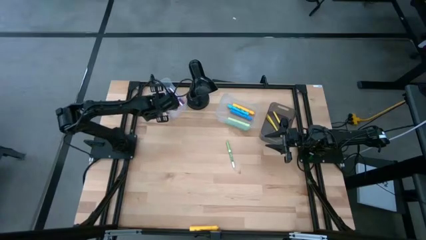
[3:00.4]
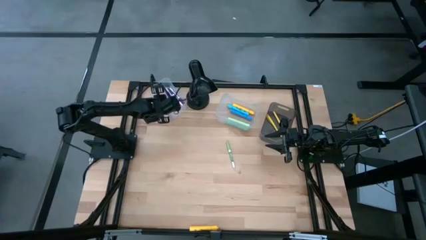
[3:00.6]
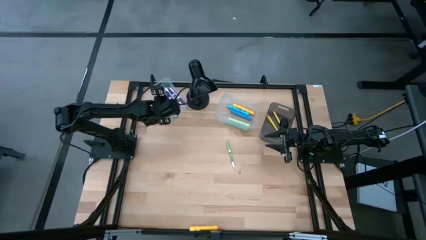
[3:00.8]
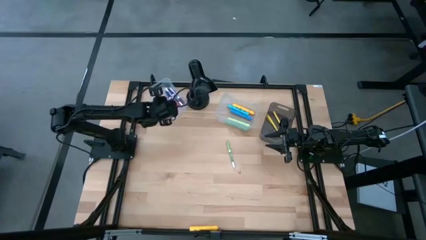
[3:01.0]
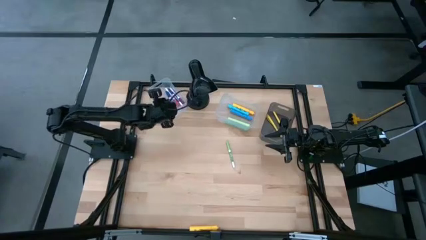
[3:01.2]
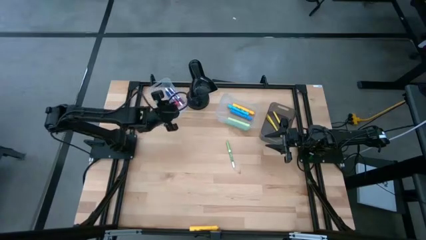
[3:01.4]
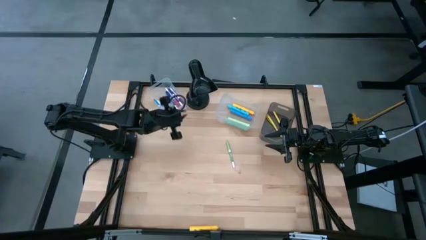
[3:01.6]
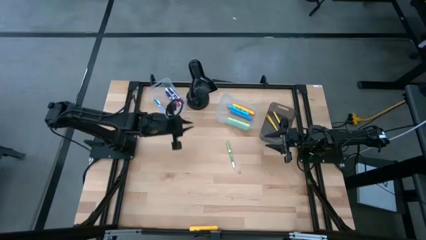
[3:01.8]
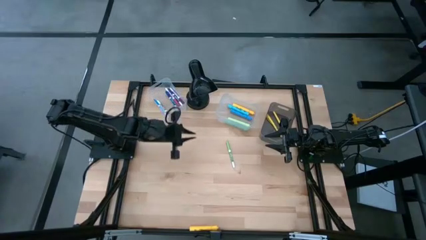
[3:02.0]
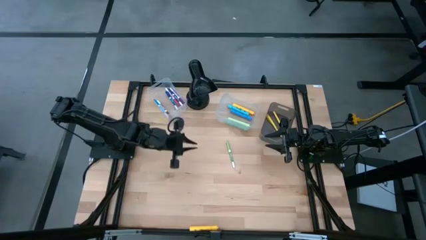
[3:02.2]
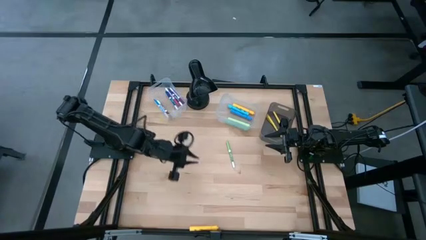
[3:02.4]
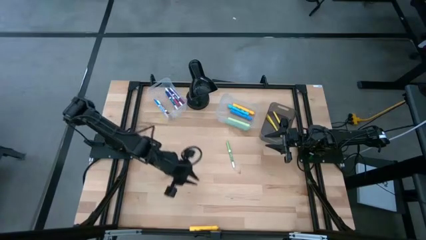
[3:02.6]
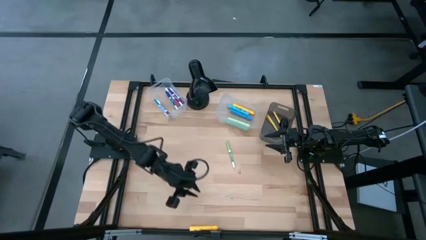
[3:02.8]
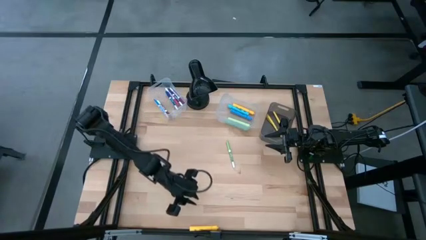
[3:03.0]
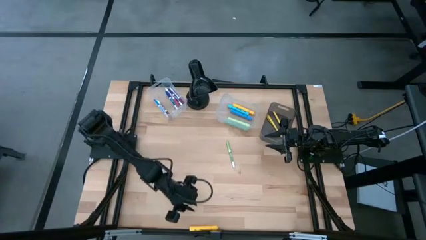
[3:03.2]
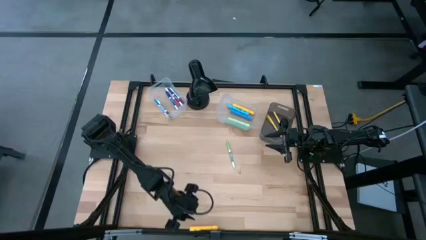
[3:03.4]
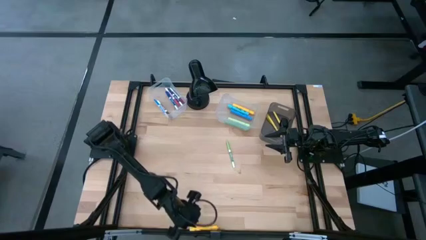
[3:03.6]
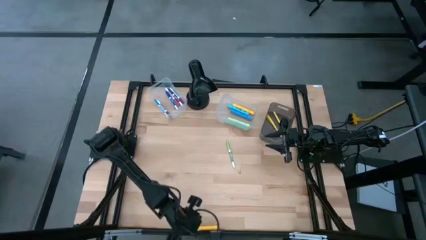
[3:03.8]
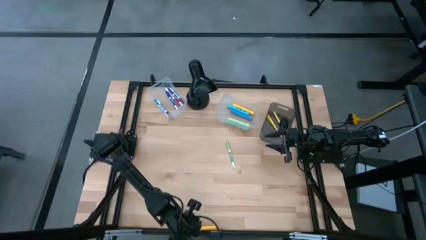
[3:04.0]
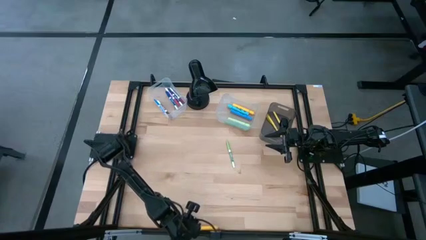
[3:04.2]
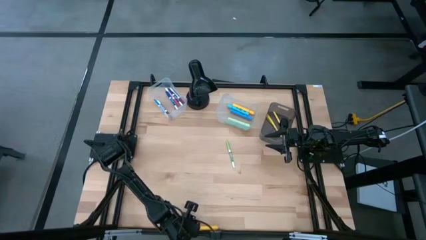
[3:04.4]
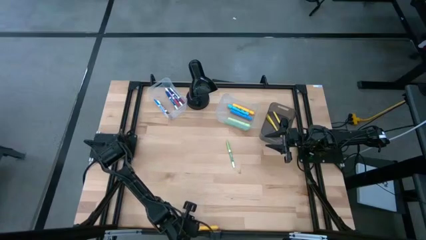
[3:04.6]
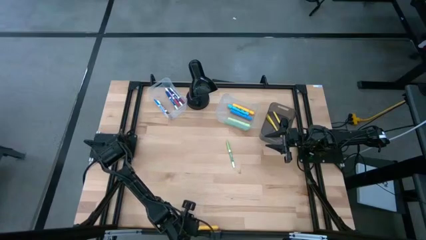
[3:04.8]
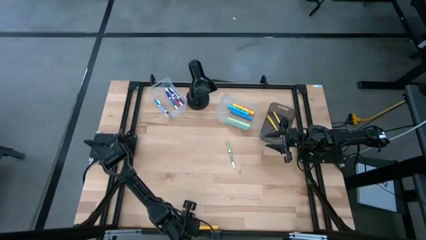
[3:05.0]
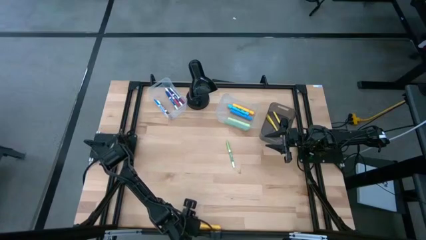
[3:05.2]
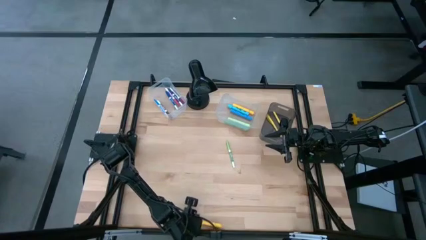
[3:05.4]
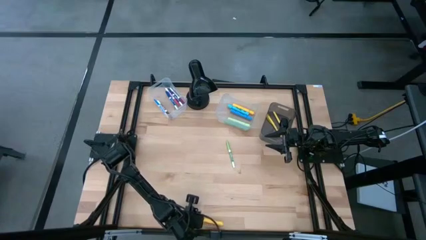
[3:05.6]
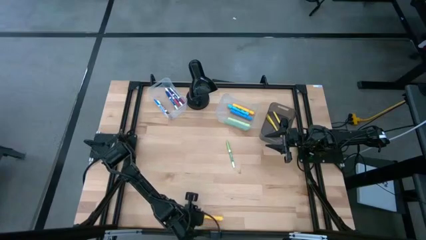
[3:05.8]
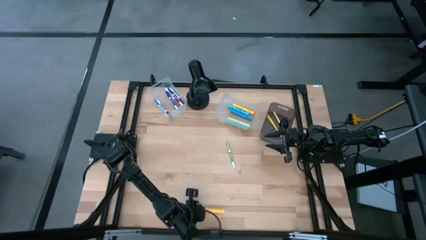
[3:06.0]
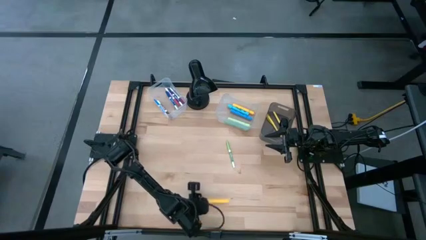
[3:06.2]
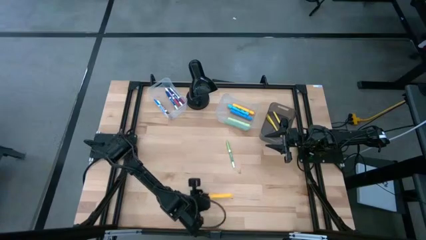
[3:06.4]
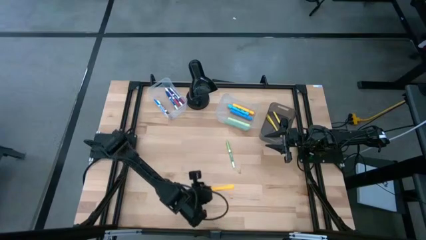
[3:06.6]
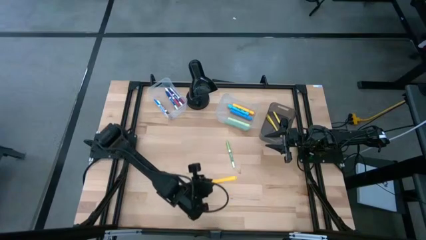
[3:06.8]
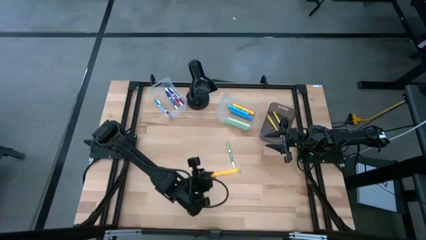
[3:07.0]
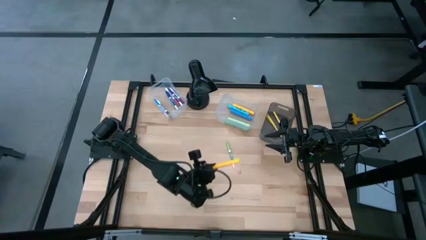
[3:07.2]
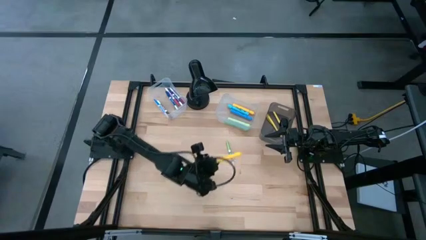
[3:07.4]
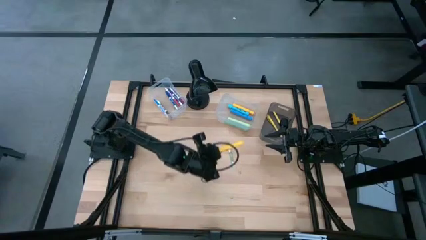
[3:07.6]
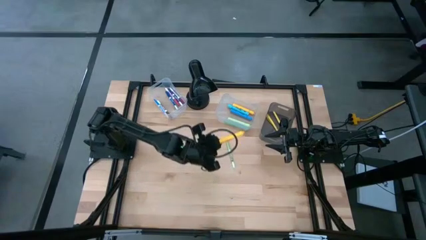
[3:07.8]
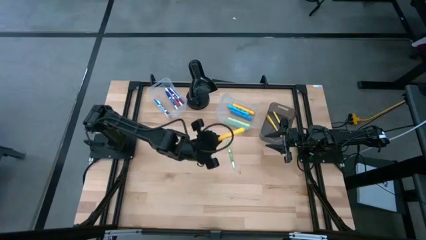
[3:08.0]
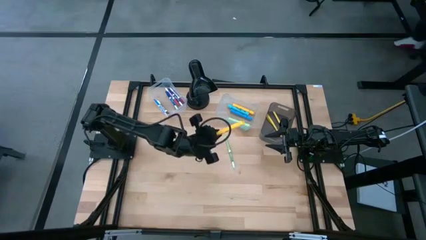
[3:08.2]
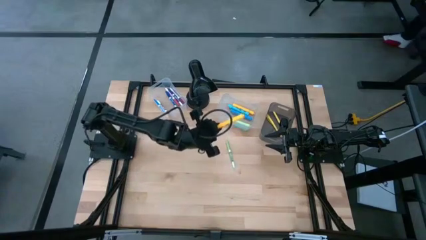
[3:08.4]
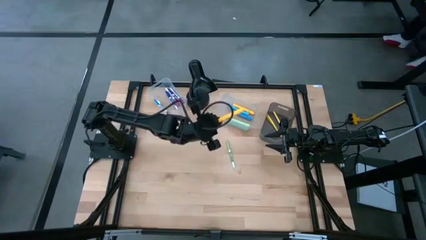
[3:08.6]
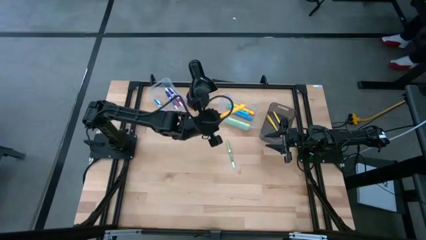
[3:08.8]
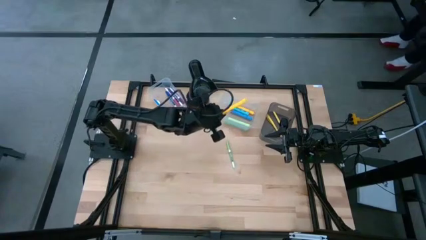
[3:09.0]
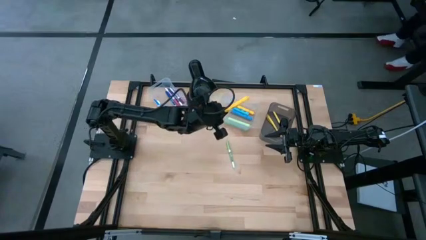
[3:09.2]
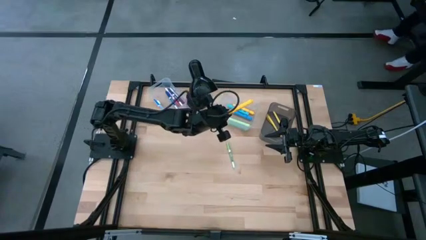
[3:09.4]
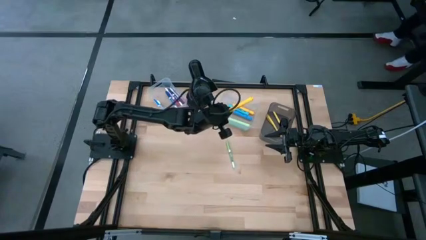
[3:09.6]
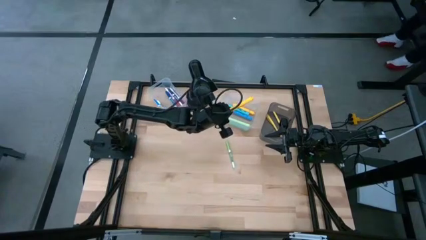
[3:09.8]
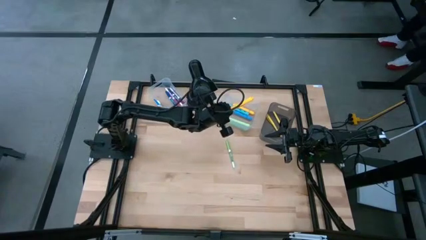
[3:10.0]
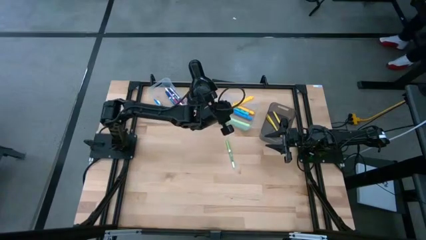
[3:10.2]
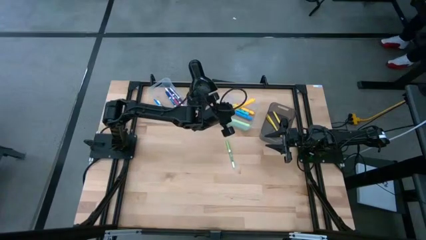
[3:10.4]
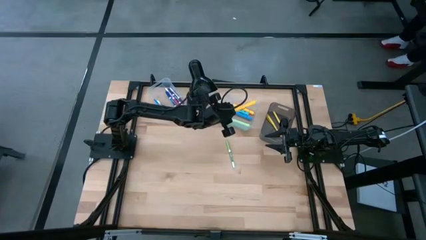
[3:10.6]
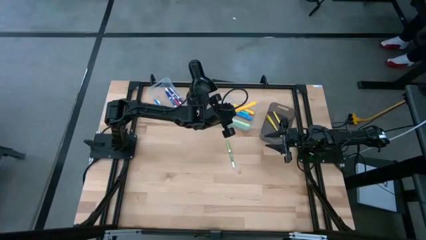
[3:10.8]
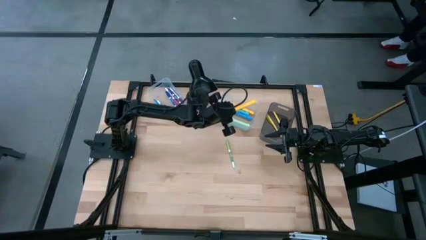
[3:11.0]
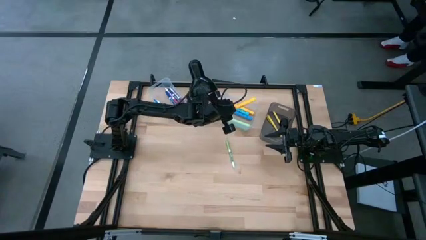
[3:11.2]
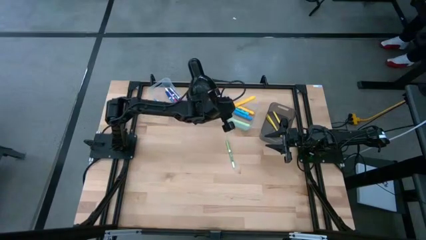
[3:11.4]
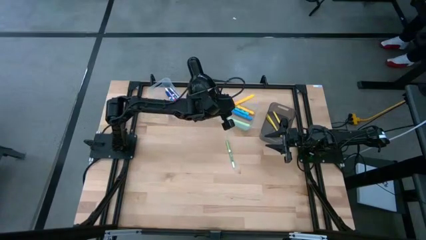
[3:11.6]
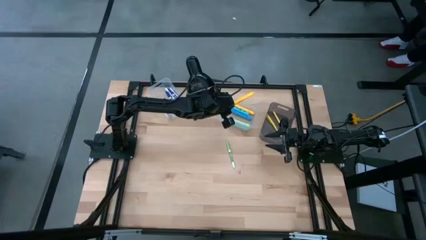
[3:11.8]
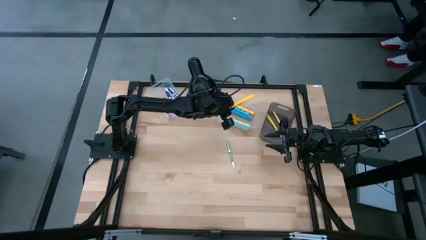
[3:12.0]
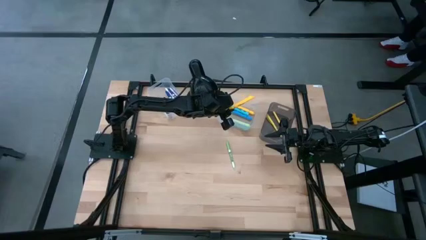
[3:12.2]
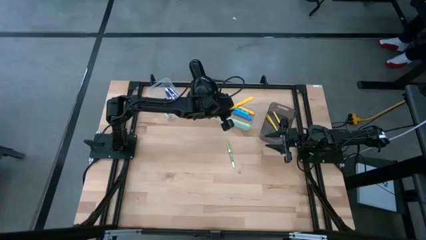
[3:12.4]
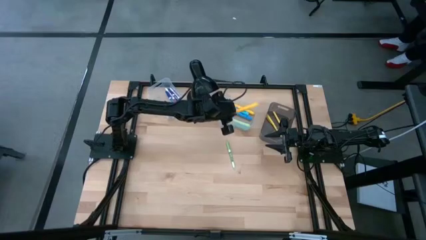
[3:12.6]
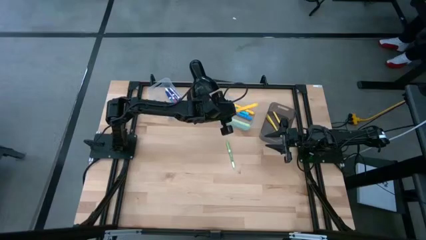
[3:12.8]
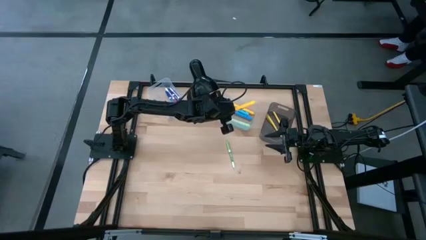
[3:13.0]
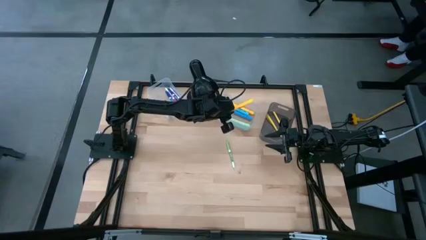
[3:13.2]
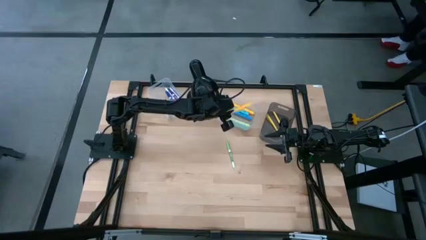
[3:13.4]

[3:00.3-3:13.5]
Task: Pick & Place Markers
Put the yellow highlighter in the right transparent bin

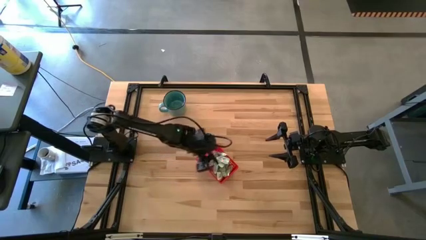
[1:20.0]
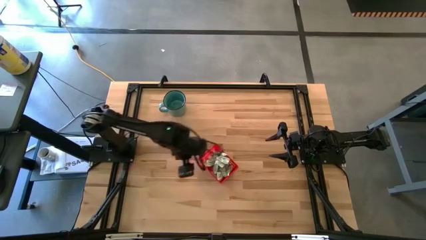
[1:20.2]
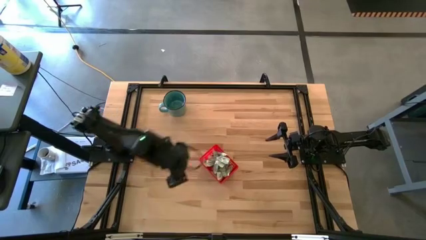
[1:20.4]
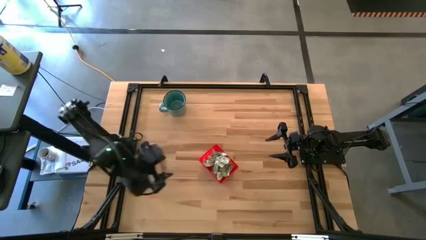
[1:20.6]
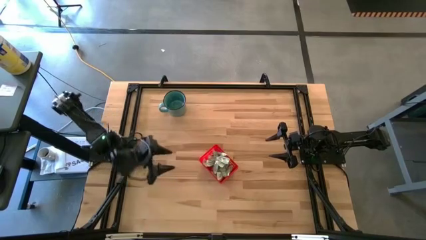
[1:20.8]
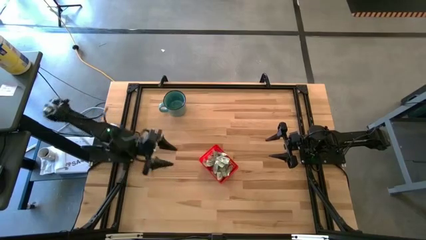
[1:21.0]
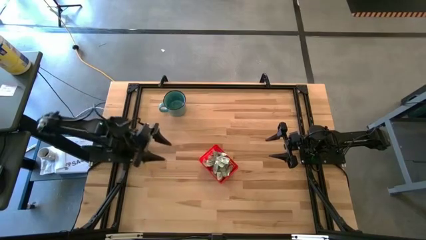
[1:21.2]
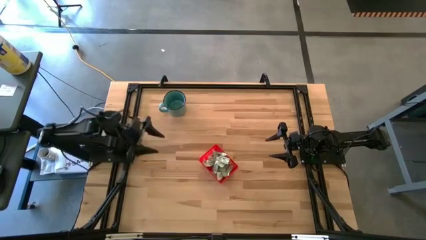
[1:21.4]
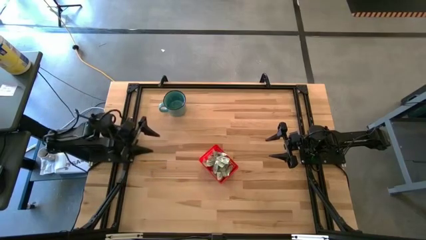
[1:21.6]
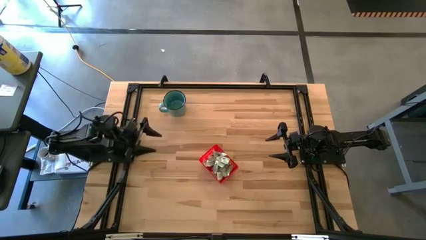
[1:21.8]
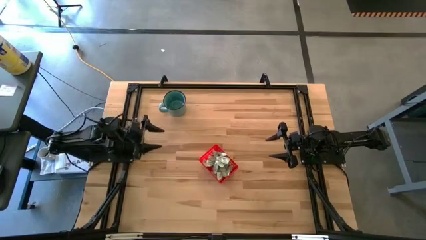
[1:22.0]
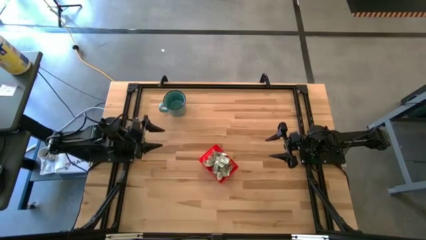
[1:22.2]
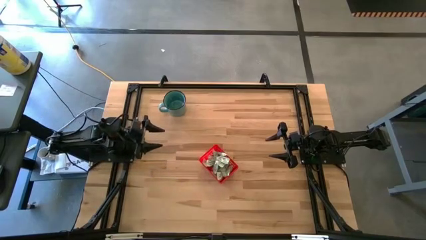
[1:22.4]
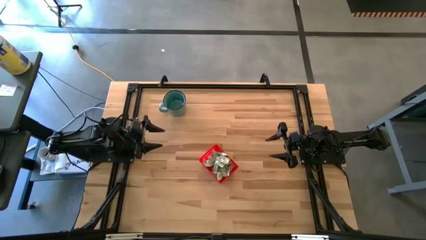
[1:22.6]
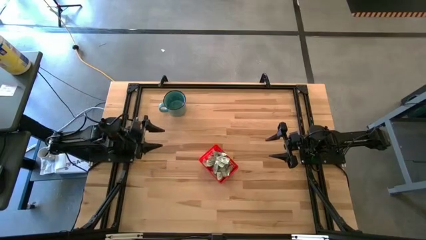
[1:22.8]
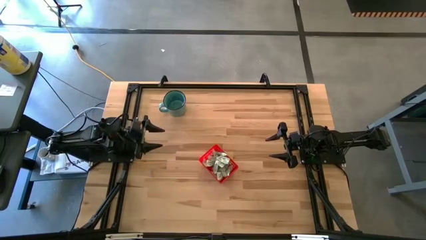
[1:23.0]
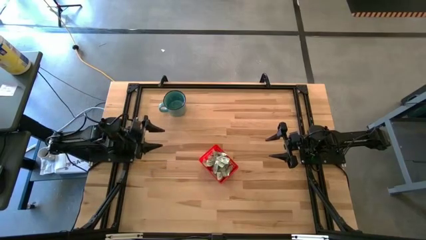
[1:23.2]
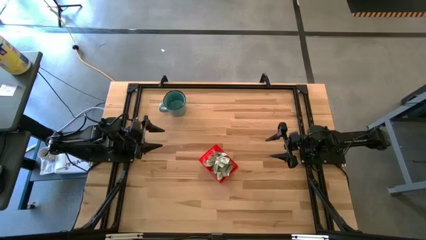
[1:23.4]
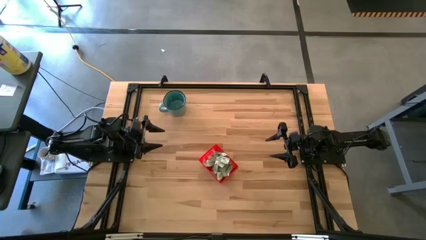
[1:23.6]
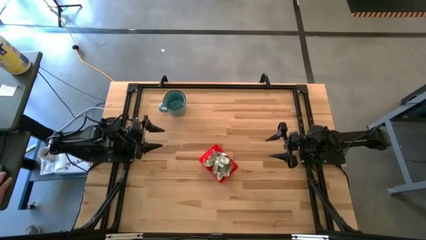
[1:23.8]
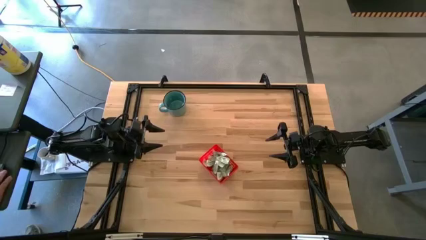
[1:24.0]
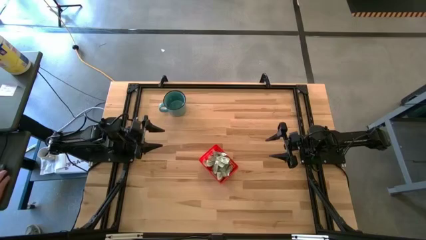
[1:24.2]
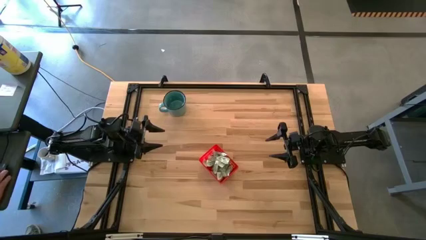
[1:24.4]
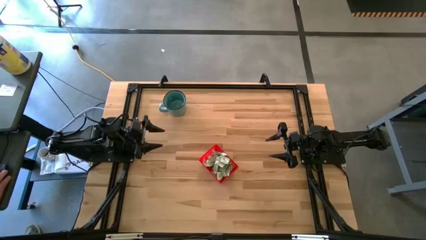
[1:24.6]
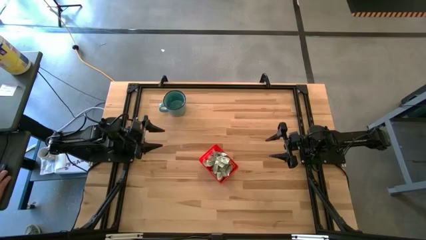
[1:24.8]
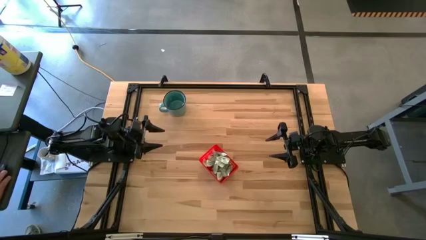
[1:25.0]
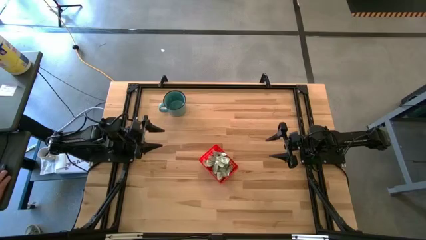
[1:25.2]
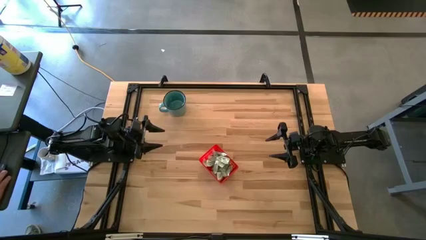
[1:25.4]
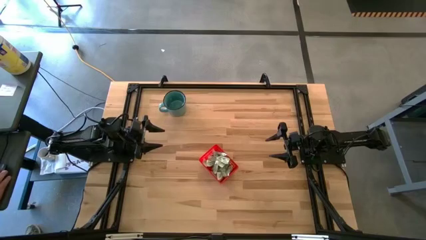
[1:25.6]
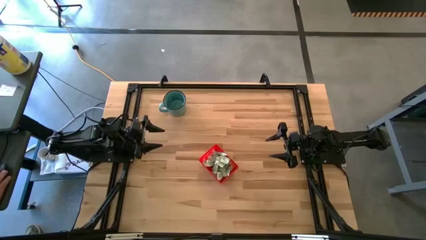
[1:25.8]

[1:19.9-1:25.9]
Task: Pick and place Stevia / Truvia into bins
Return to Home Position
